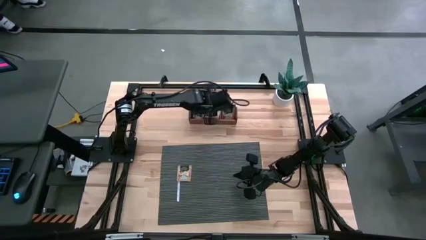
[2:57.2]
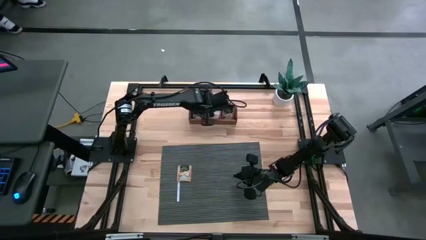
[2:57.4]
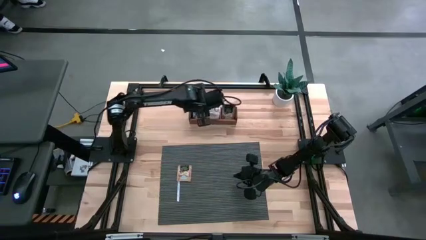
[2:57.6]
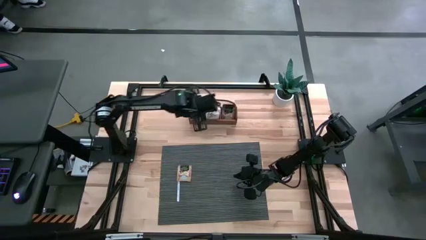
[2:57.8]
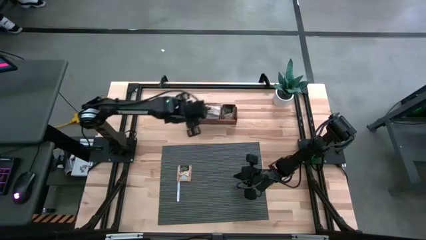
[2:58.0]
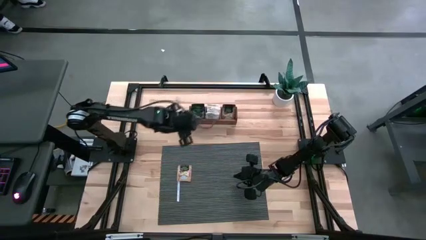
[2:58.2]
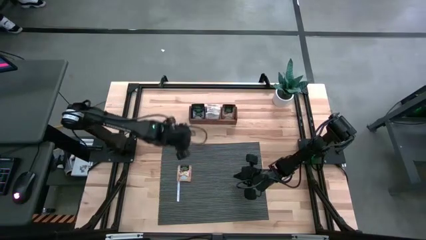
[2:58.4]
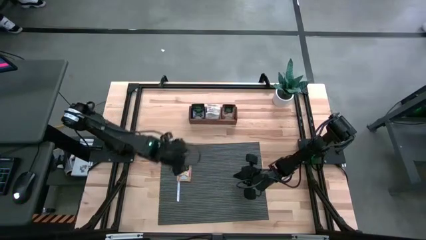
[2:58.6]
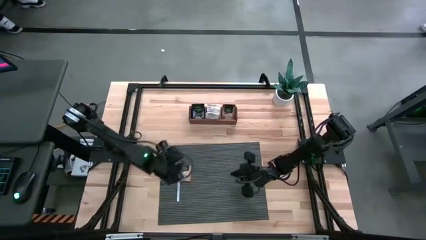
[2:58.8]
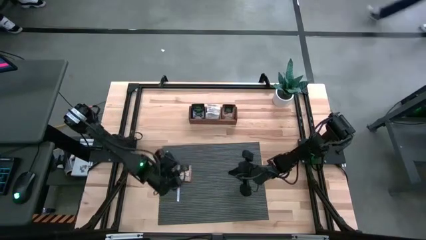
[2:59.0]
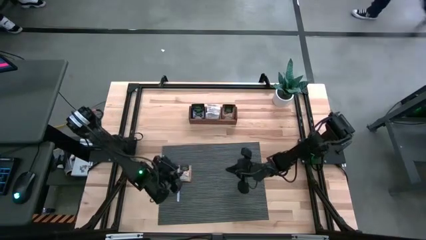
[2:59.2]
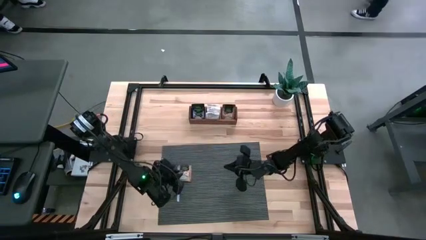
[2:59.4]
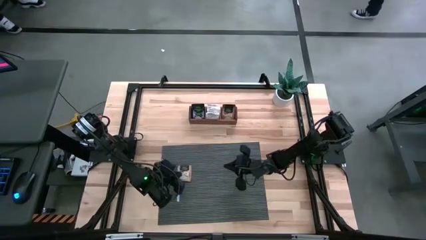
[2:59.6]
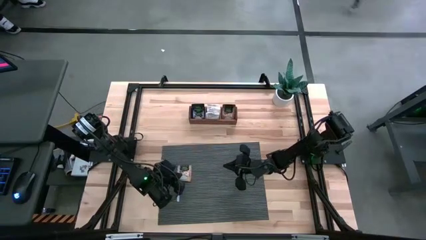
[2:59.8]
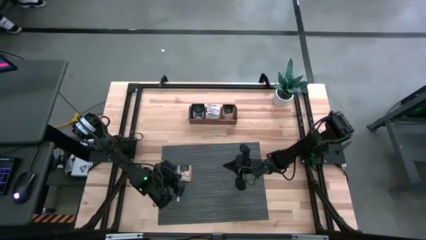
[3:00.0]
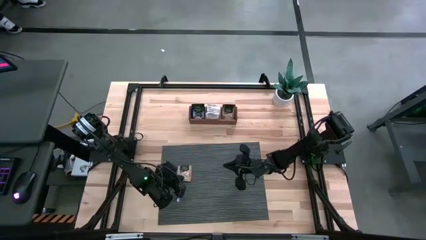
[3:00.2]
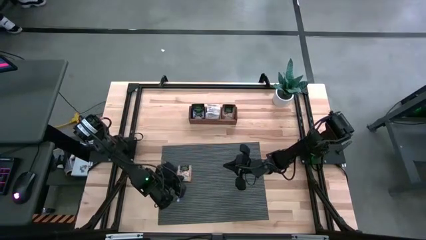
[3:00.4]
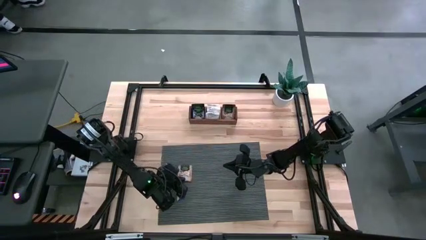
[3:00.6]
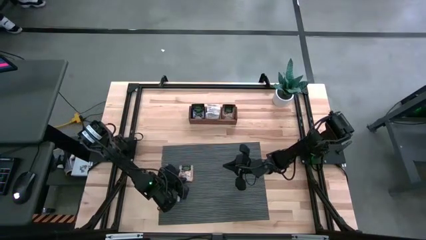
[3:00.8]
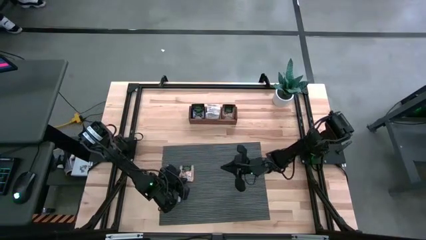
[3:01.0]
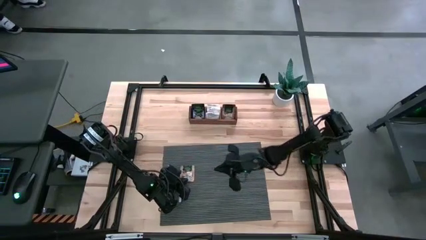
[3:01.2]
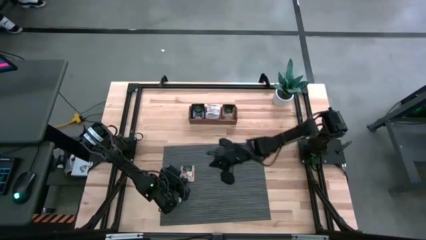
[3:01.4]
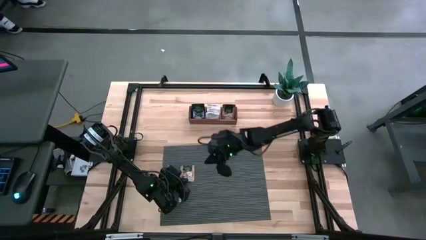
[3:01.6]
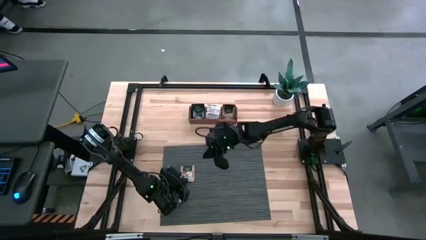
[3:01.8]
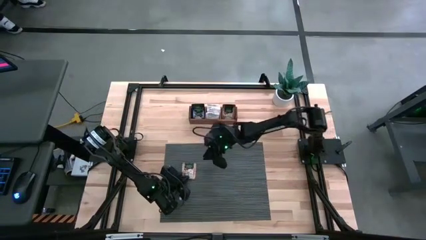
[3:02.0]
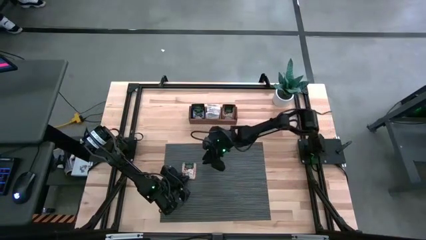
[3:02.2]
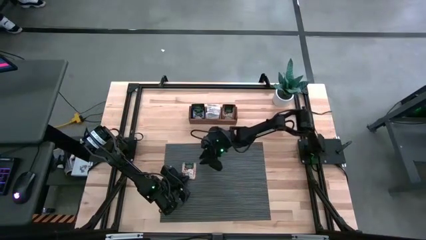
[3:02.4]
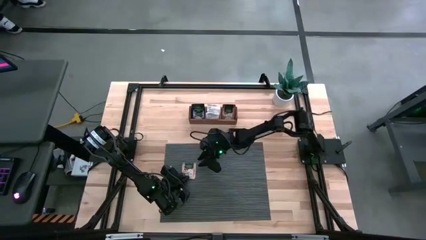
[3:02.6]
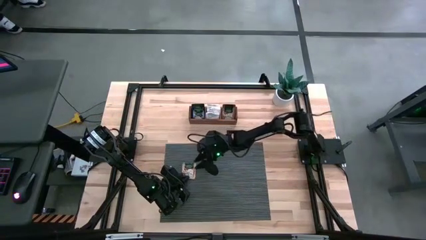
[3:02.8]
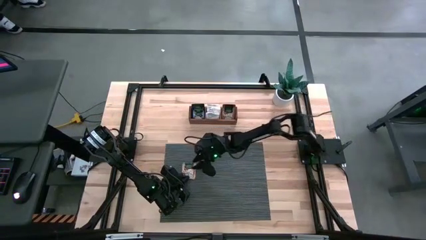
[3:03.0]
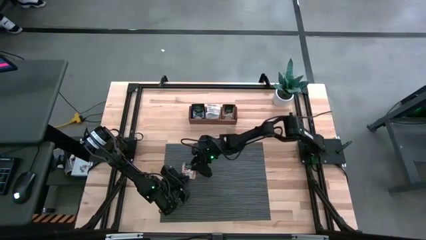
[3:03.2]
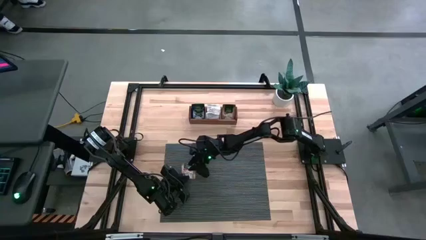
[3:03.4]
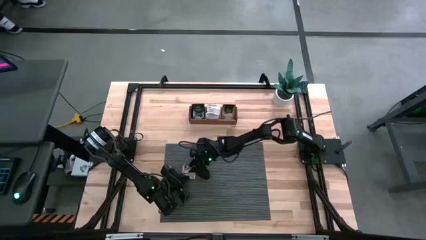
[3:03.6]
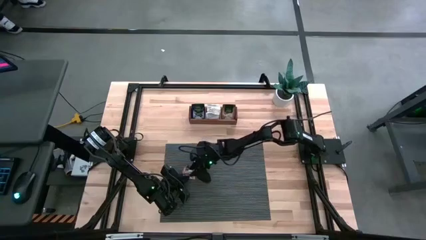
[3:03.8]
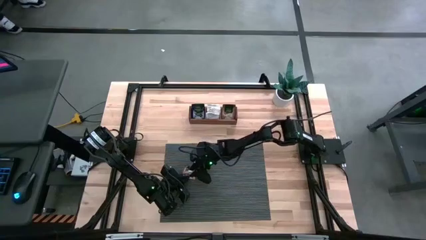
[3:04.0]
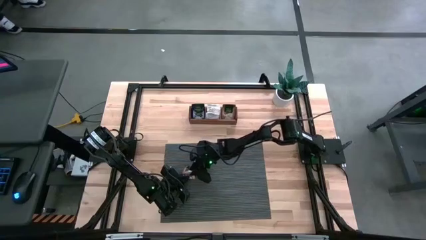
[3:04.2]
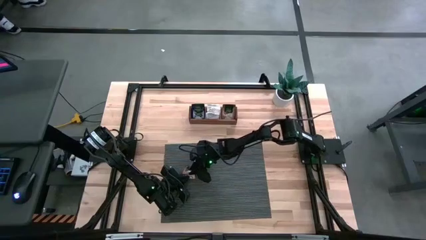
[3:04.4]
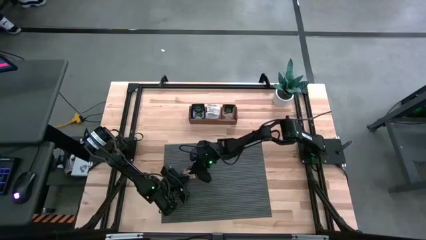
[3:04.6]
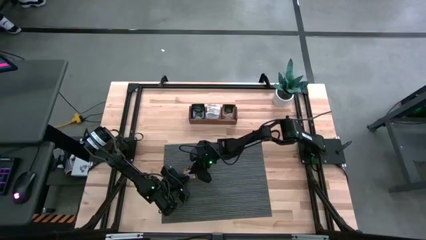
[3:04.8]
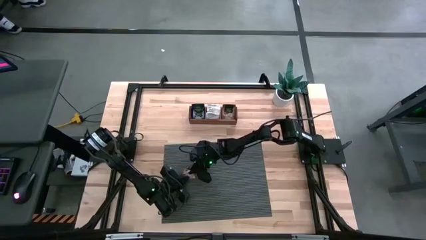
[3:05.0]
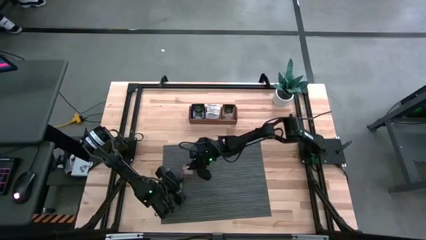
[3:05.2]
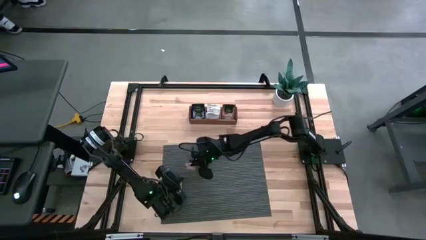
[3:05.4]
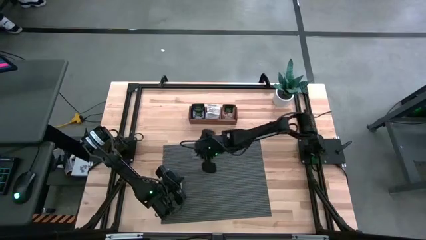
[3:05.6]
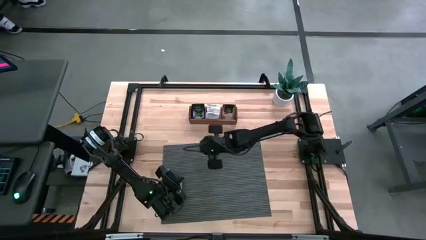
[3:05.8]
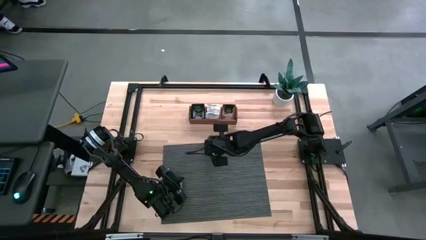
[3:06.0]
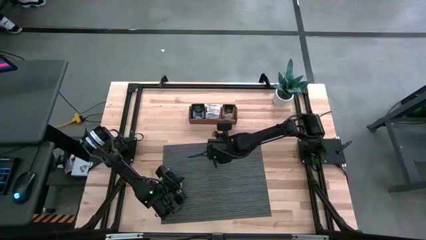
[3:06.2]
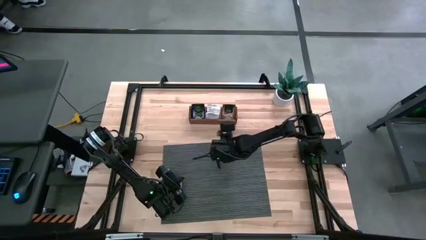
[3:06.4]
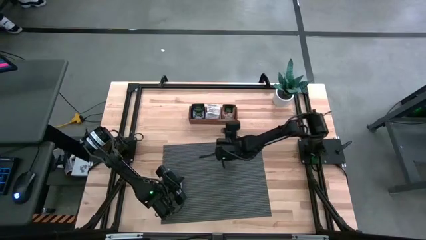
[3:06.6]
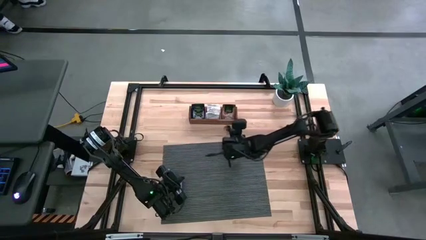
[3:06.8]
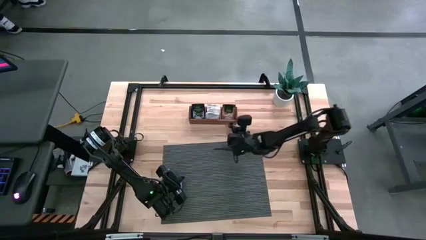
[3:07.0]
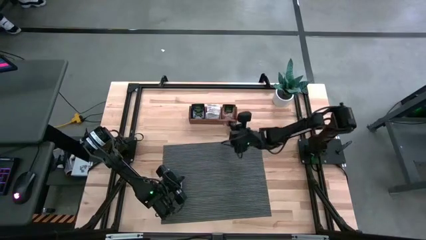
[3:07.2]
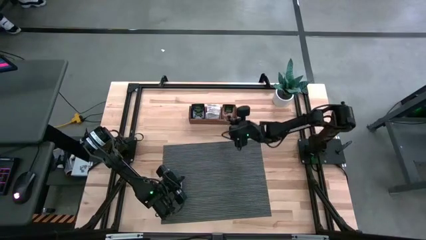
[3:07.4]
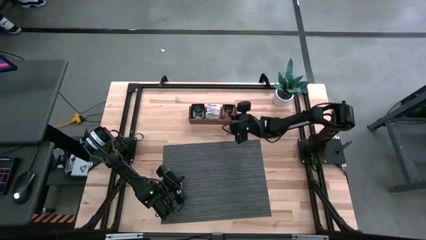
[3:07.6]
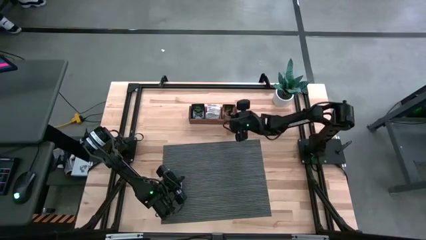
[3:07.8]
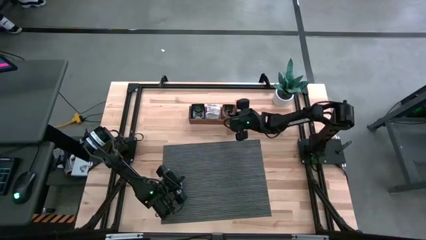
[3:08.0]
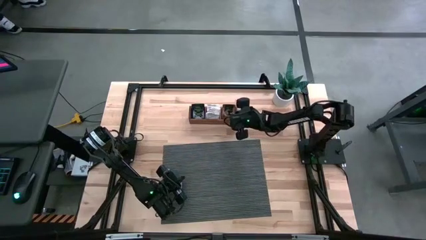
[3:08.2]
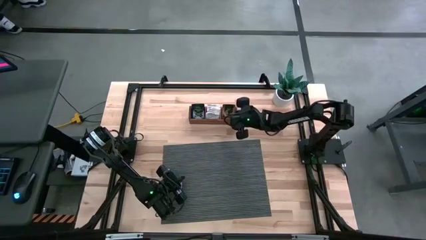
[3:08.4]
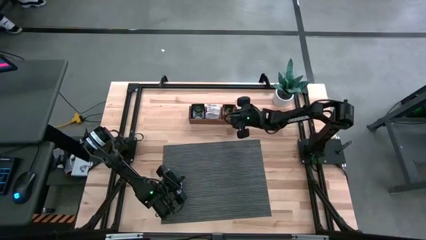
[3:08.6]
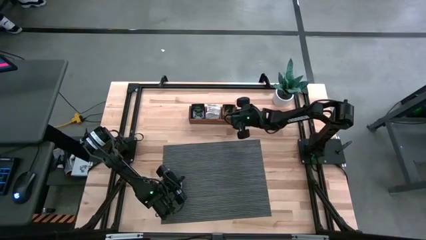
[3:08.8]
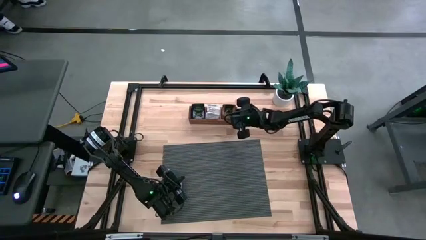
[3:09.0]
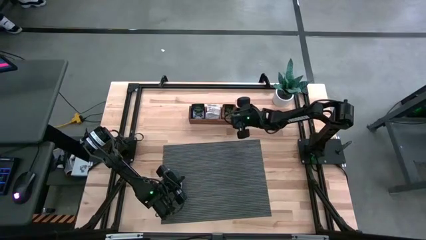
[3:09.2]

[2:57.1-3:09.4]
Task: Pick & Place Tea
Put the light brown tea bag into the right compartment of the wooden organizer

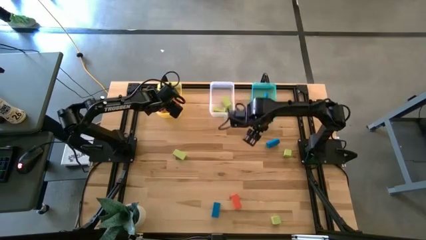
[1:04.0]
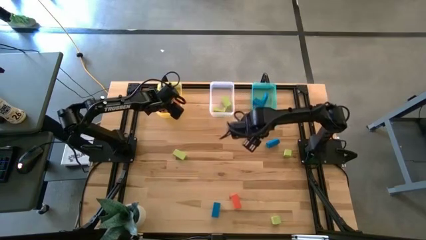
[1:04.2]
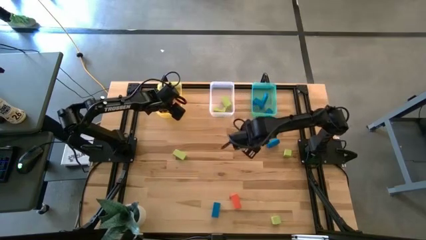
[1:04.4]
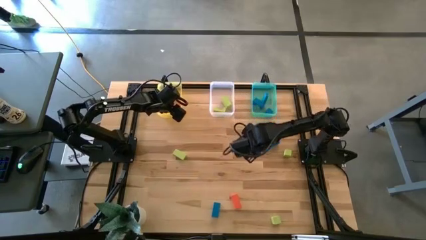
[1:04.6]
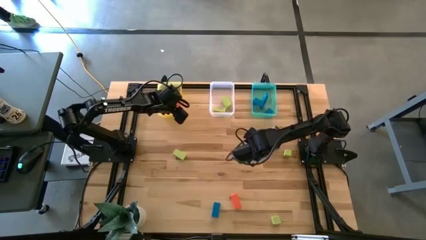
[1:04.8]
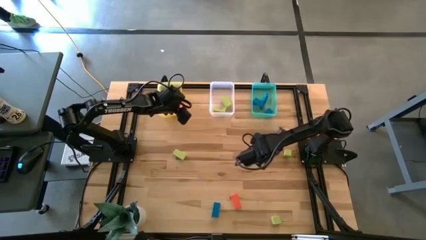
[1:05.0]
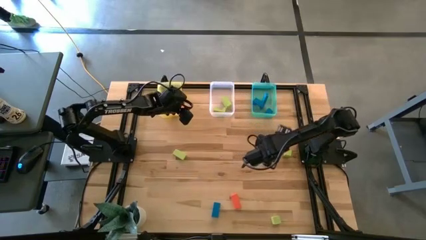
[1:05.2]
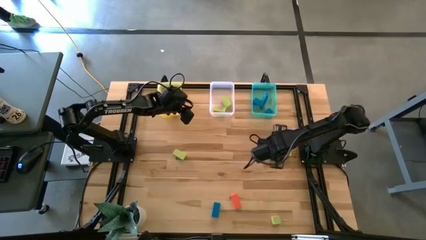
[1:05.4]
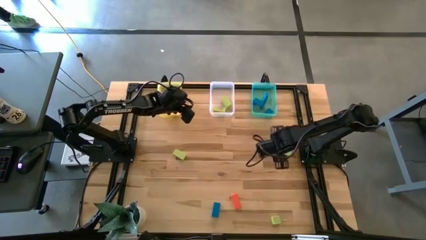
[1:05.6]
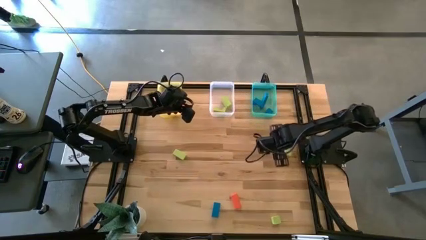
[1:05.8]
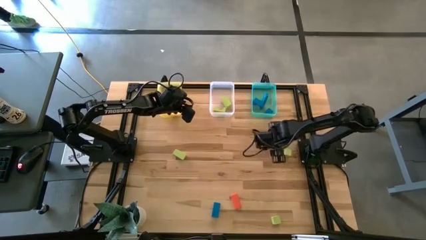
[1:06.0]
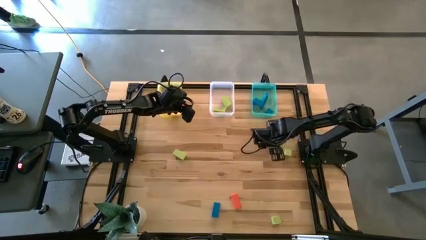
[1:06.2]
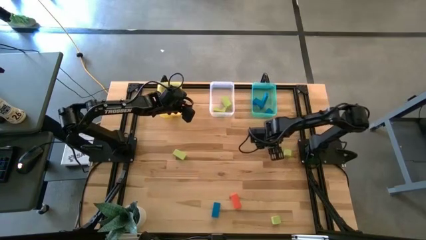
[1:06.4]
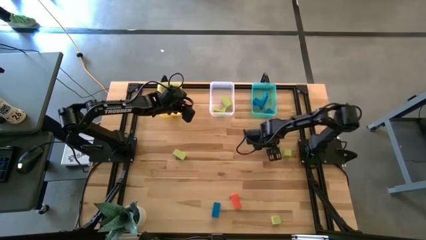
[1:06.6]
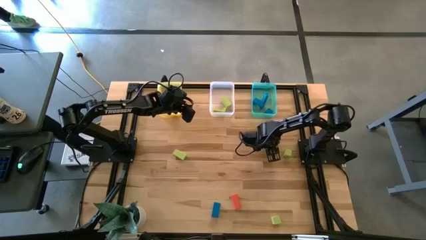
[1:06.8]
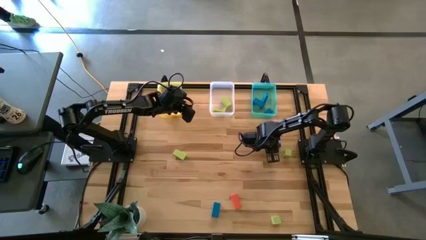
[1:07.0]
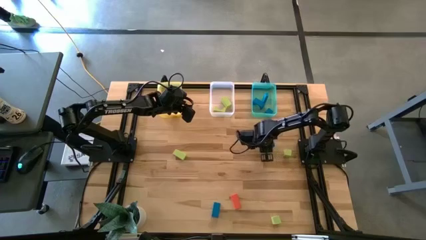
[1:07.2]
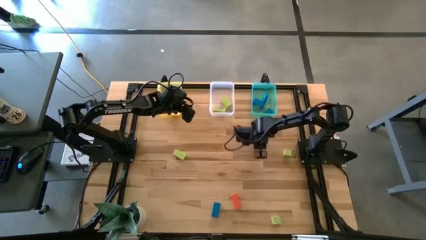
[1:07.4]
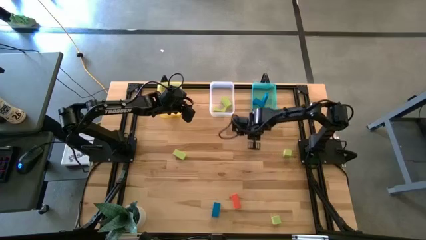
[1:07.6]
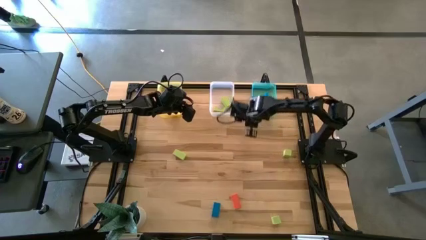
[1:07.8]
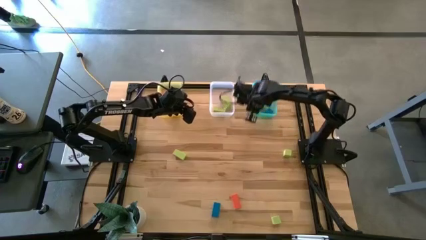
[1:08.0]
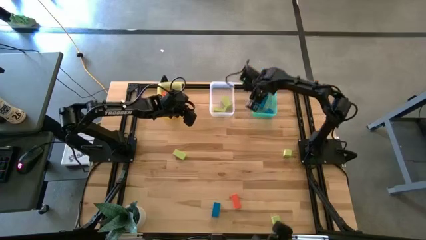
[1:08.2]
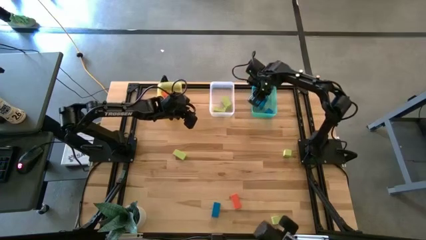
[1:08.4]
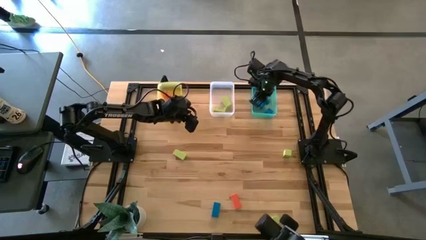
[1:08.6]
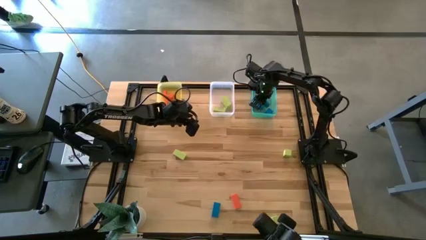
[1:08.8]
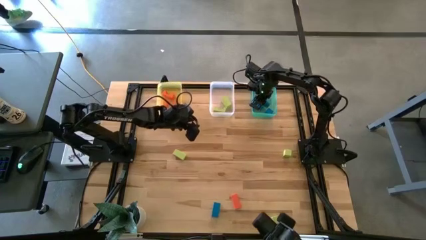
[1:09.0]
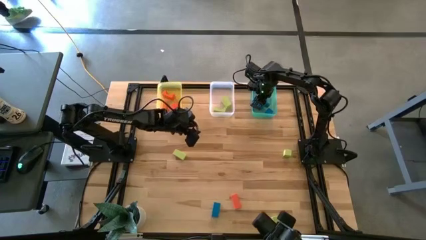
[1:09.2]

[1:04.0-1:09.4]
Task: Sort & place blocks by color
Put the blue block into the green bin
